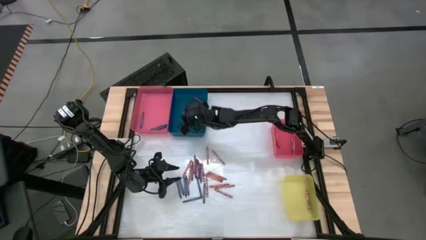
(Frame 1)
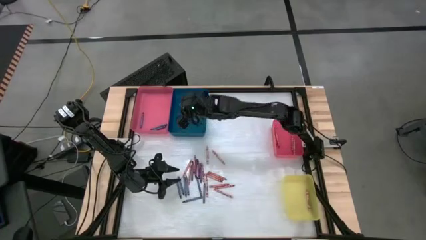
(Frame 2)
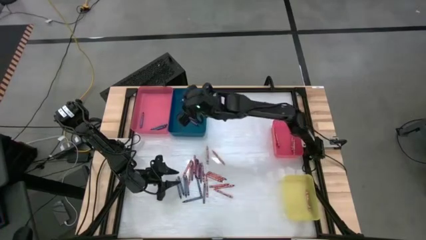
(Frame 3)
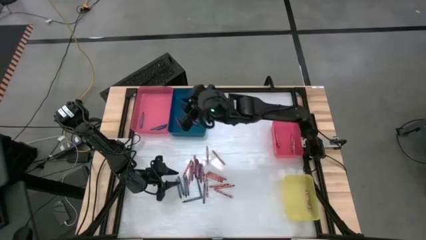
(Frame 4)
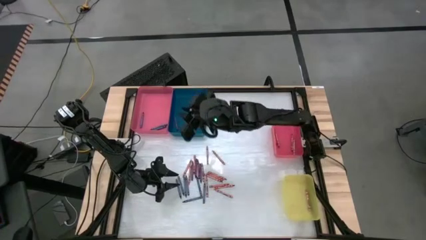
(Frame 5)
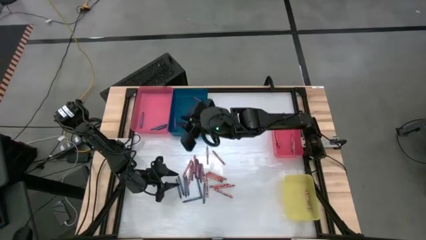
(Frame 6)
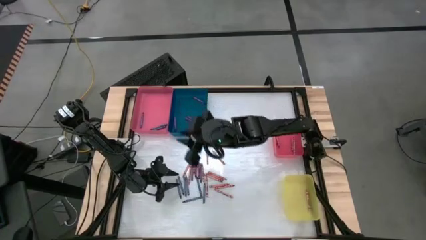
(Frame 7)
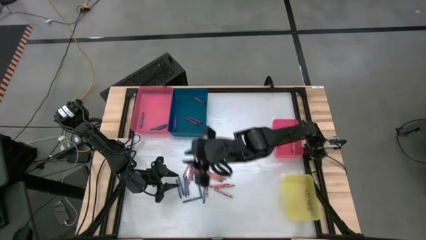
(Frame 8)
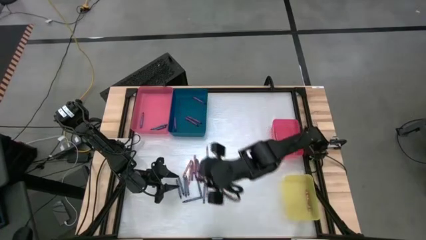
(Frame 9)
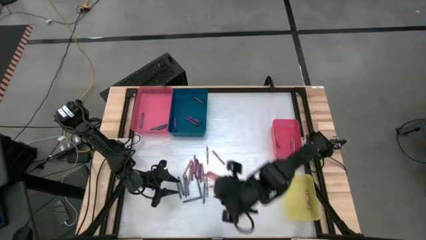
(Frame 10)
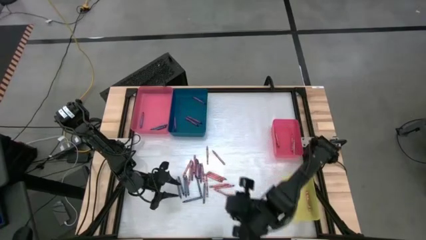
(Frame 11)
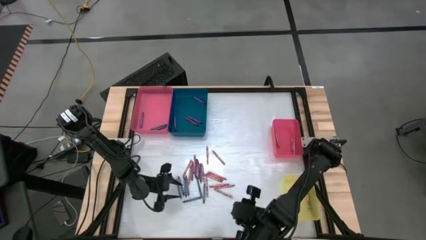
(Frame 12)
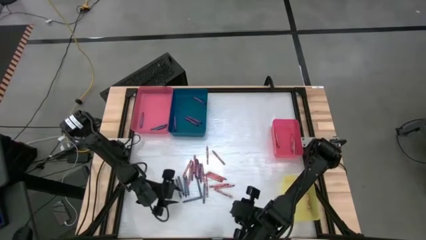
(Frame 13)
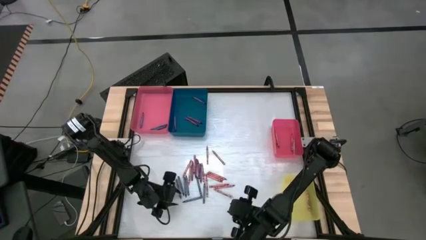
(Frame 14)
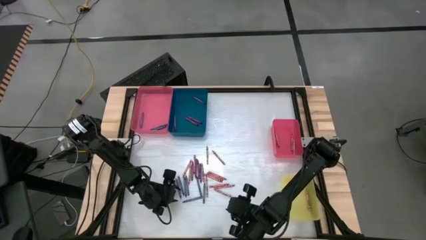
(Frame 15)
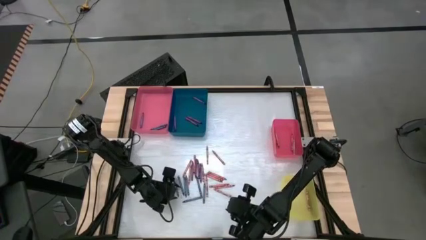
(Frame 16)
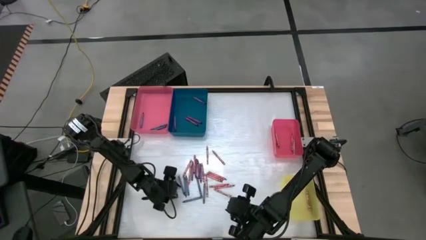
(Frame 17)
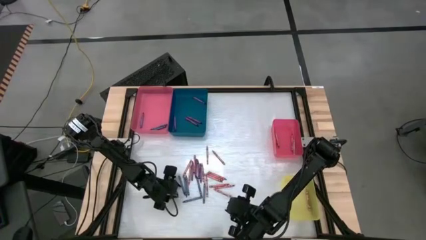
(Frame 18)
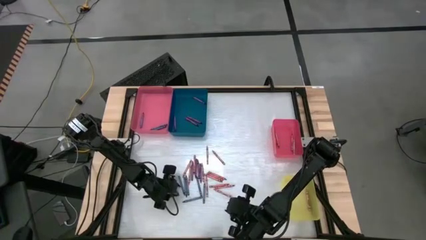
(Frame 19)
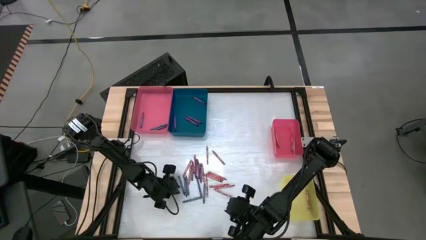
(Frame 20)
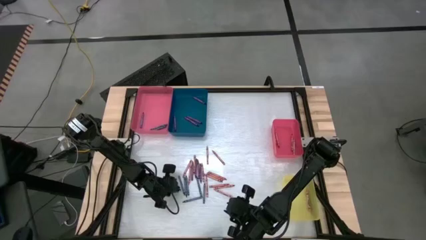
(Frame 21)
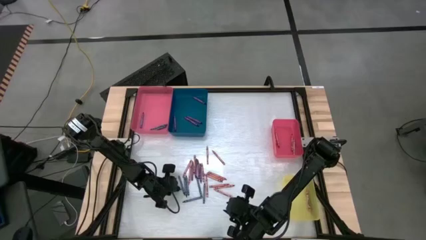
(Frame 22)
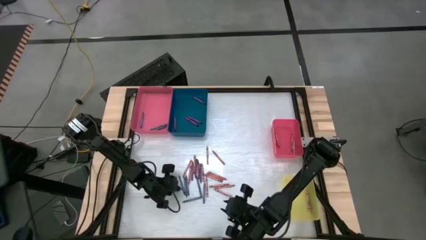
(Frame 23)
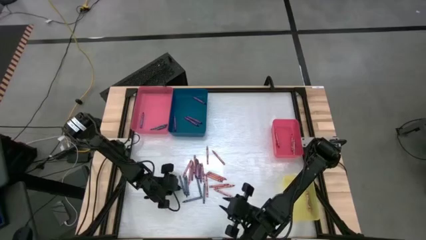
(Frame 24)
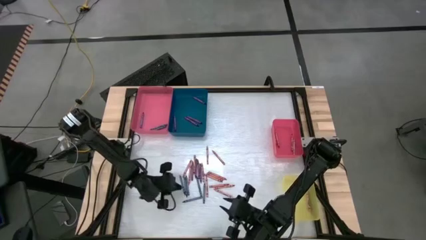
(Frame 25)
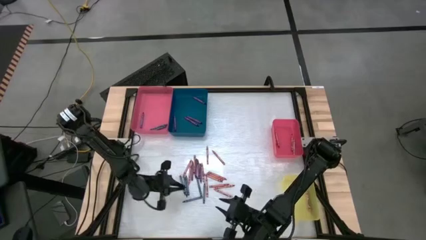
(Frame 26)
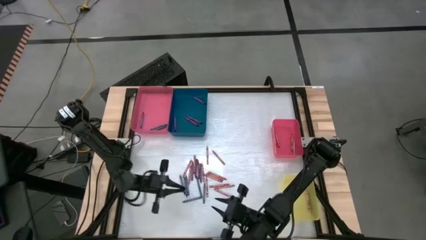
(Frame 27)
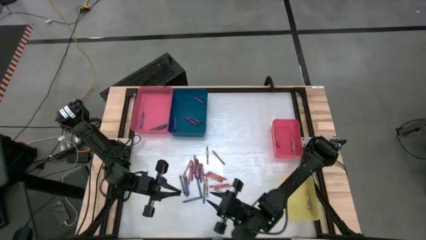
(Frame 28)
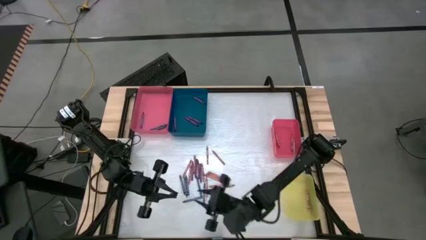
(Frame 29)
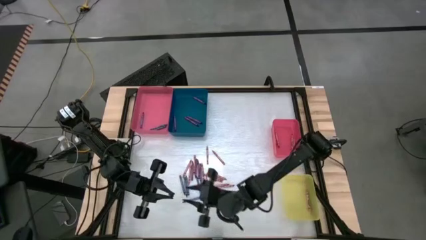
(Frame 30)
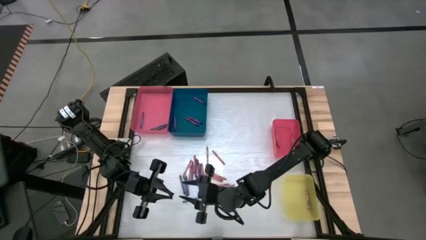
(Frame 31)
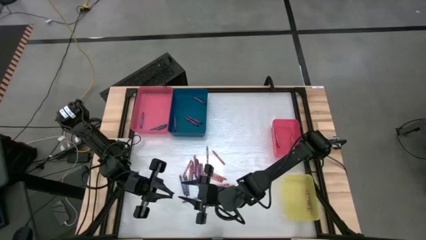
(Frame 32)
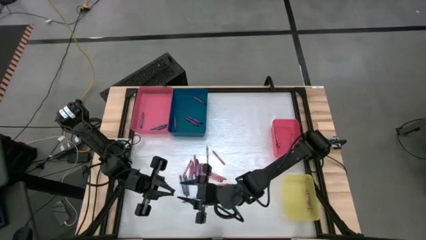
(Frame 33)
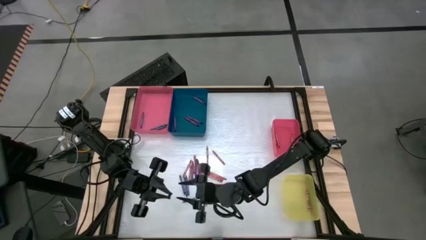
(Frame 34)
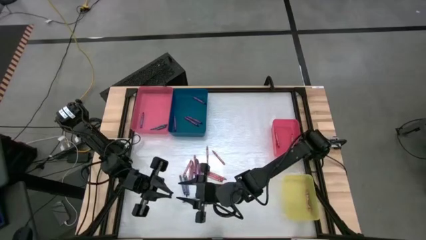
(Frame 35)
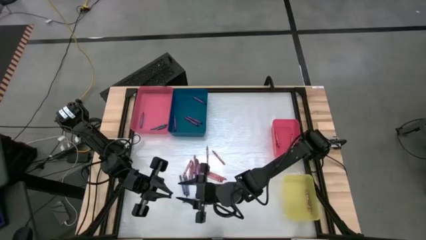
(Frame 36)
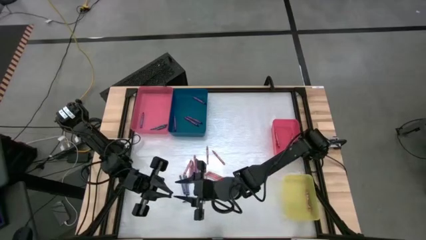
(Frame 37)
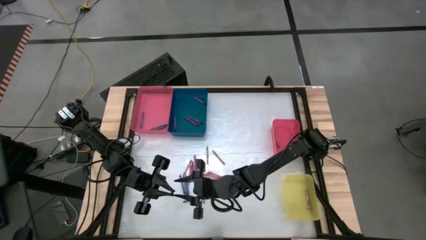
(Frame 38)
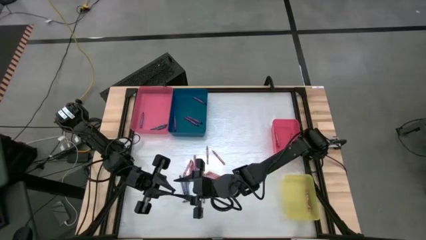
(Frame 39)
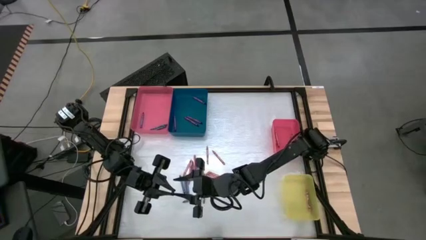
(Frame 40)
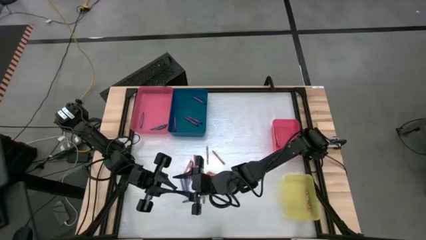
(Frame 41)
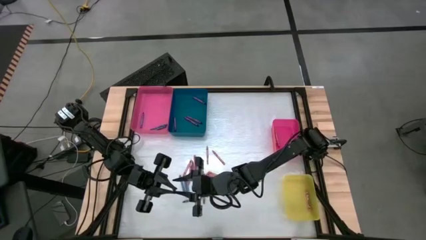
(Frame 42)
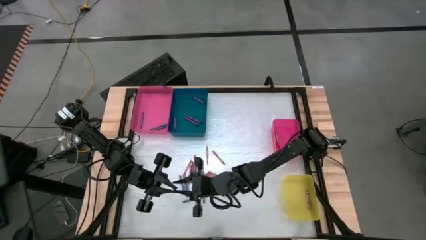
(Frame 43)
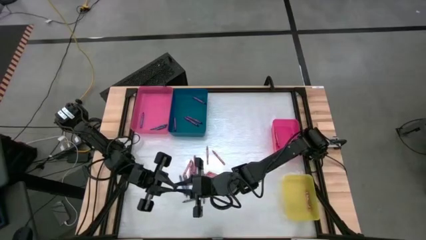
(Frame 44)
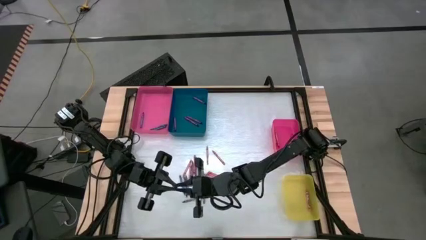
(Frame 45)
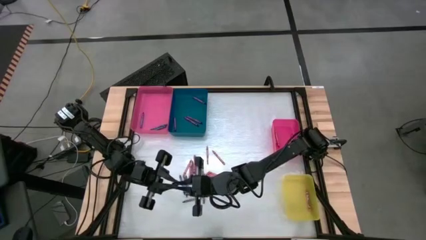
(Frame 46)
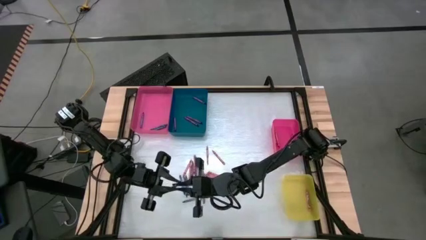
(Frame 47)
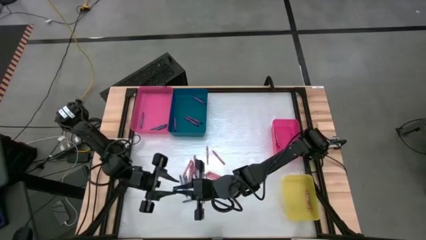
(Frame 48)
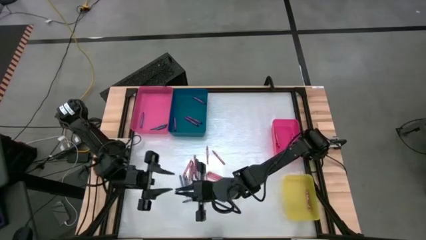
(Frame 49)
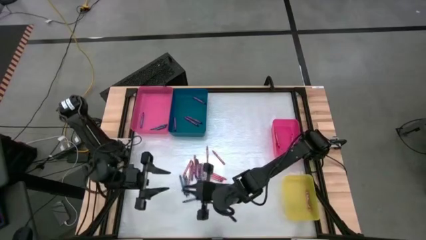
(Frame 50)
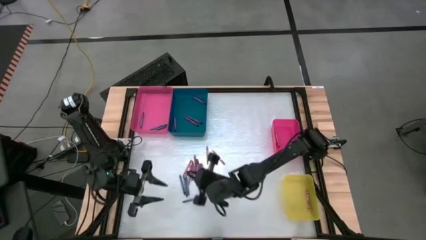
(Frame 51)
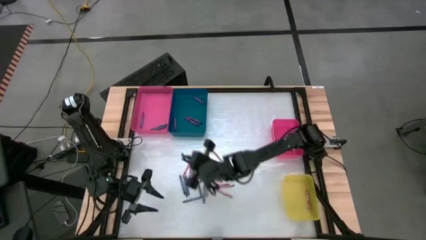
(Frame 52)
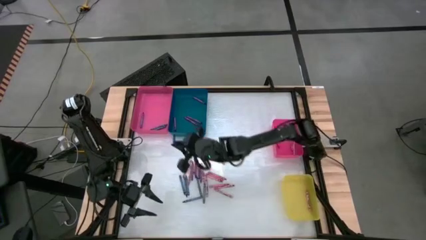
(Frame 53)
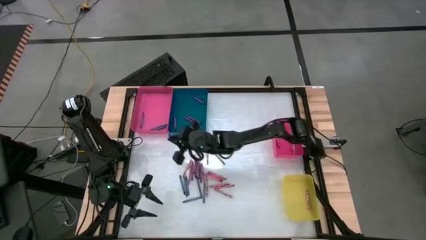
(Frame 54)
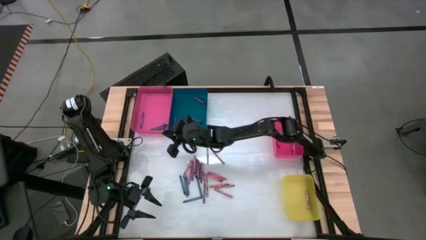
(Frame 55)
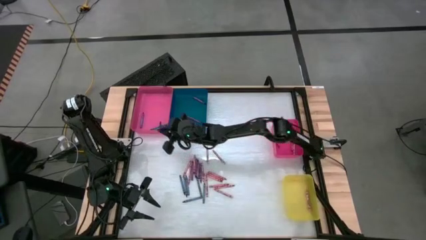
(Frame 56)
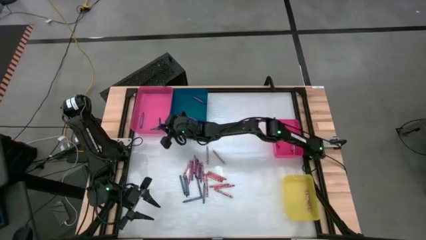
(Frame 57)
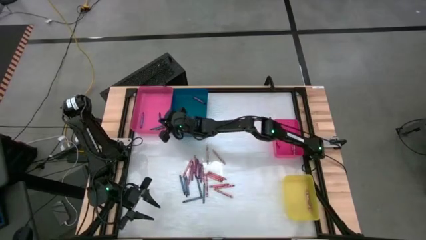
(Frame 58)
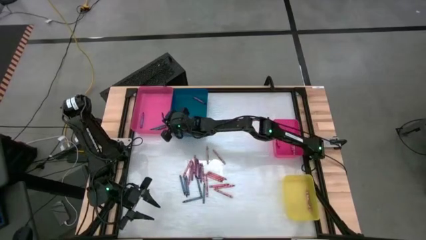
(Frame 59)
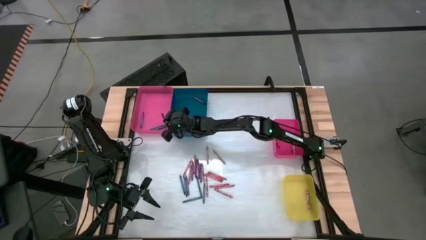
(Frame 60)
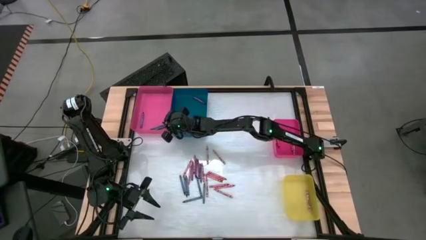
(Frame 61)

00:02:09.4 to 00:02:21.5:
Task: Sort crayons
Put the blue crayon into the large red bin

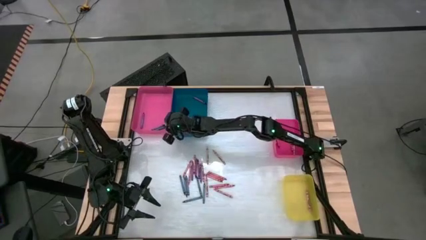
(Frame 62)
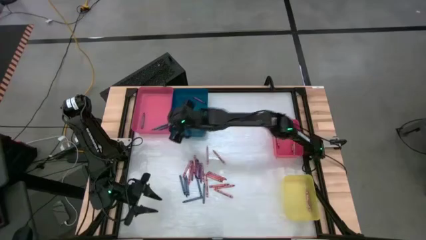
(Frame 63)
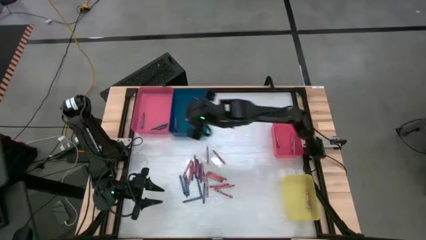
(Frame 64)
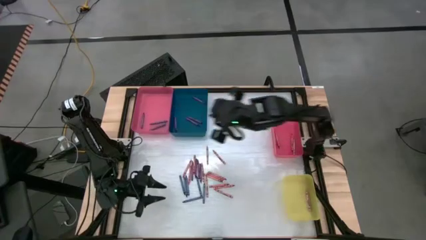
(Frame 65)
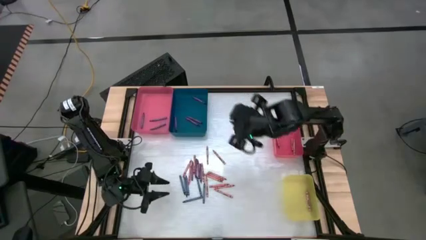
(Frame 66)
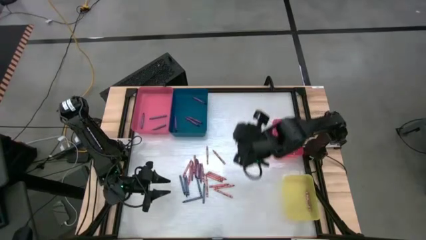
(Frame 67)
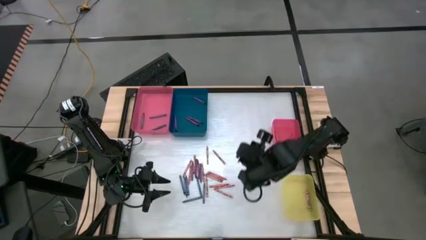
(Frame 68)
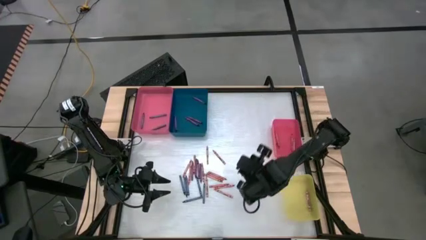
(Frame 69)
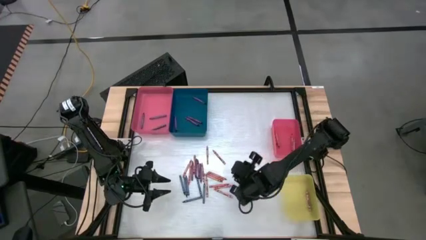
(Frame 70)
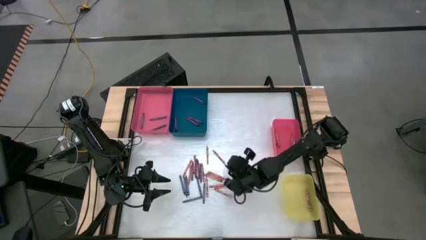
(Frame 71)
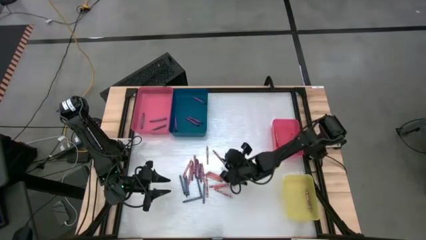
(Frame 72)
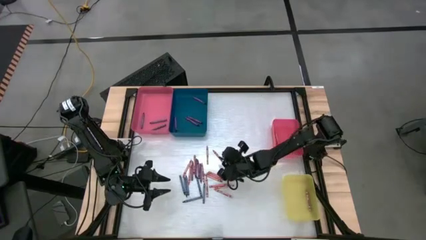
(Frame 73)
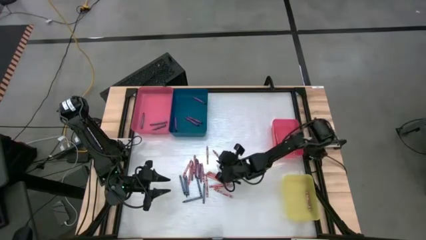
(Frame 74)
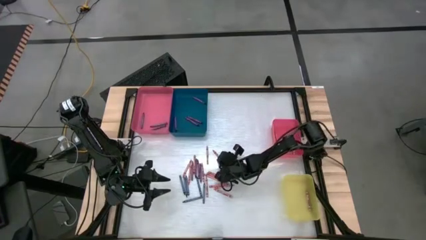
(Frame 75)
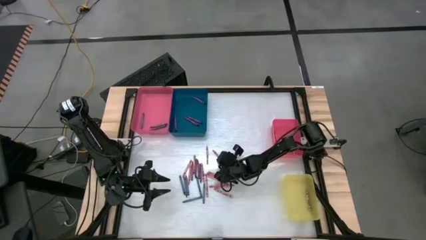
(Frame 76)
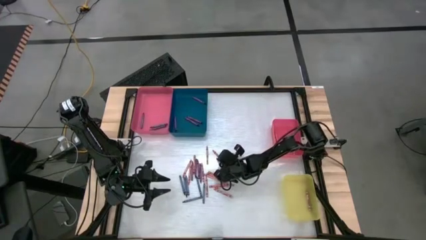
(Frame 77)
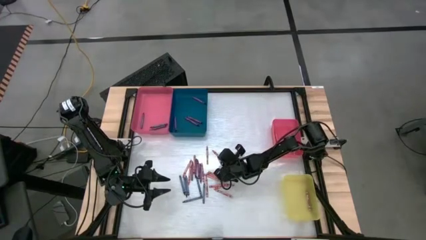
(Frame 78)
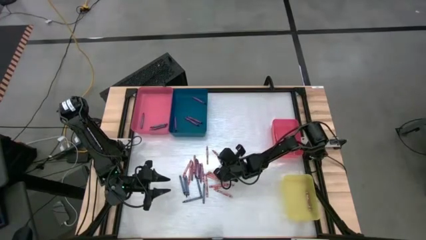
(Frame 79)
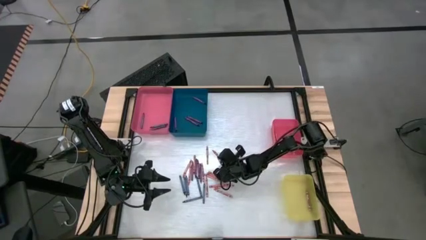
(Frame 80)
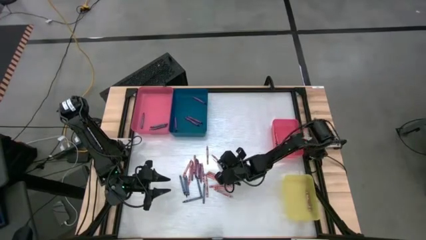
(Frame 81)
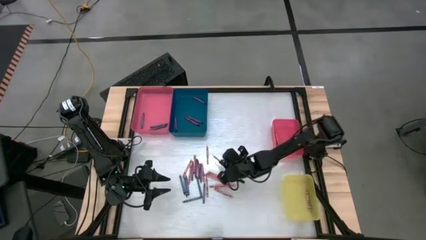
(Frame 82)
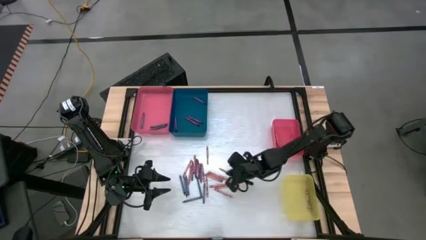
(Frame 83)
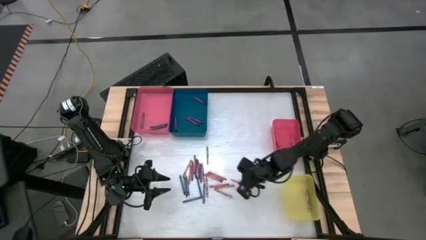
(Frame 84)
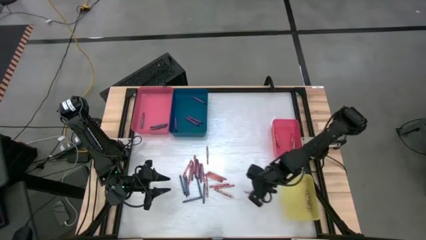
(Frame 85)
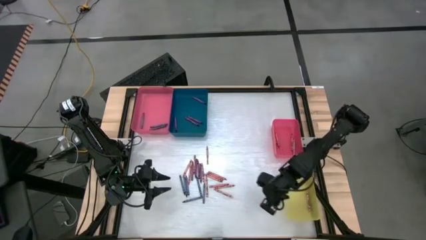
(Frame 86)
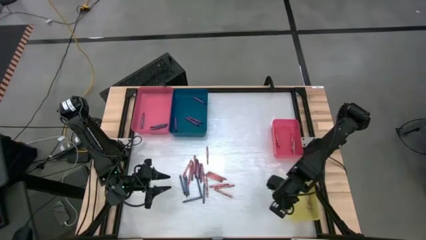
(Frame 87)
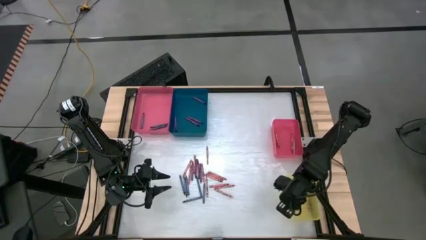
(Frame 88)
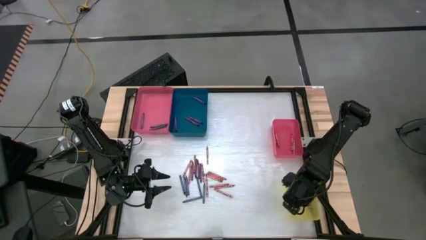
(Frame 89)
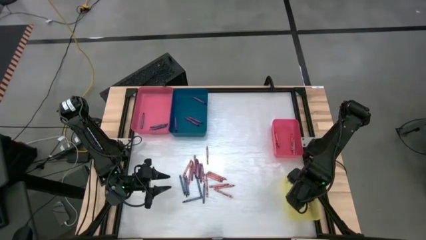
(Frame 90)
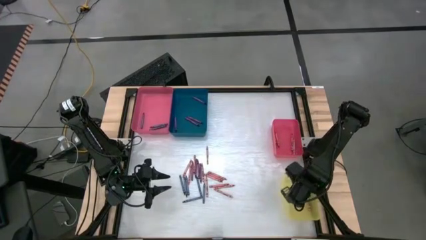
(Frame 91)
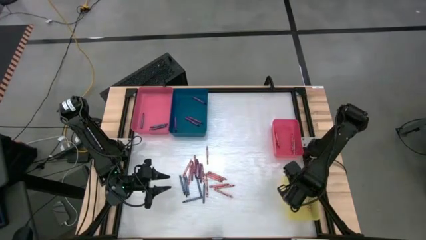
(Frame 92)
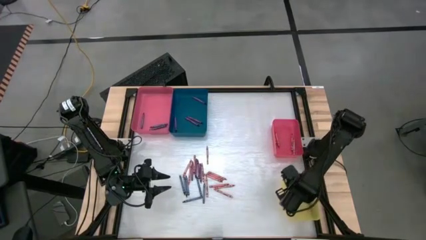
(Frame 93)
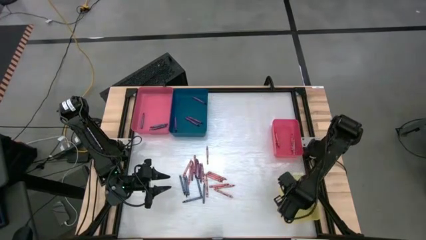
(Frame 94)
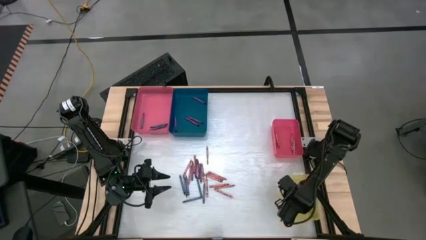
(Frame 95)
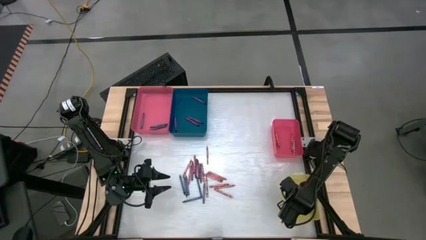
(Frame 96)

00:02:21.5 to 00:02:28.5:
Put the pink crayon into the yellow bin
